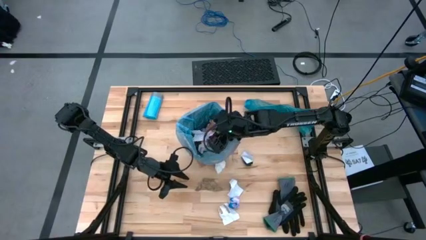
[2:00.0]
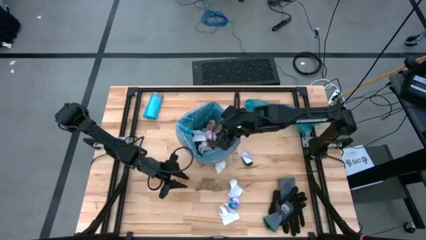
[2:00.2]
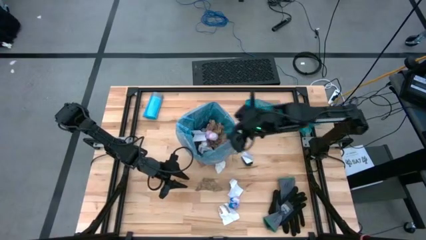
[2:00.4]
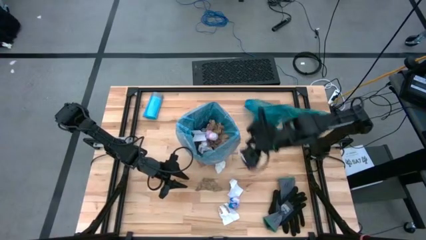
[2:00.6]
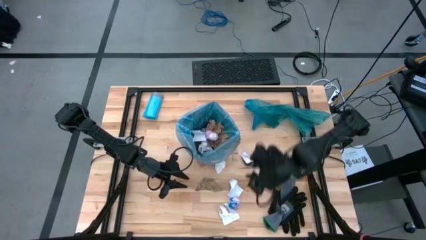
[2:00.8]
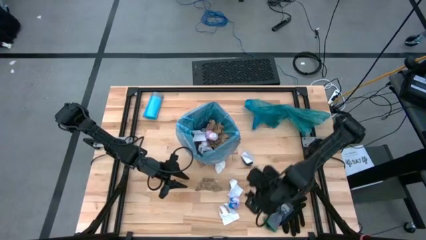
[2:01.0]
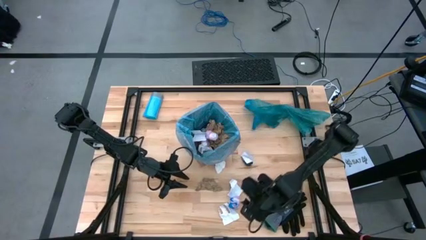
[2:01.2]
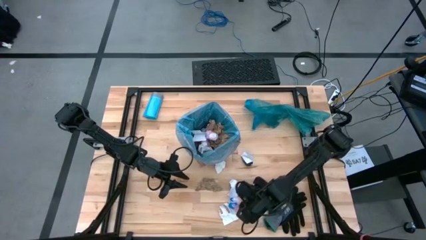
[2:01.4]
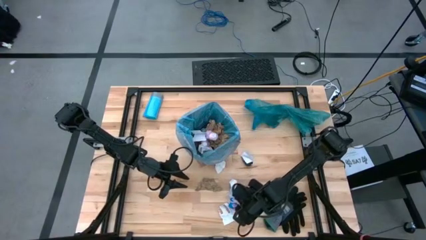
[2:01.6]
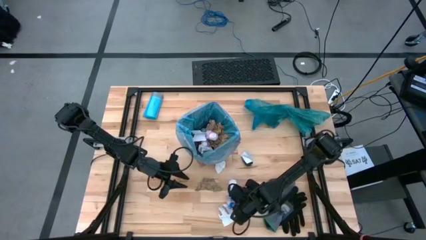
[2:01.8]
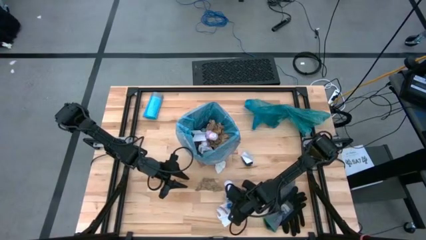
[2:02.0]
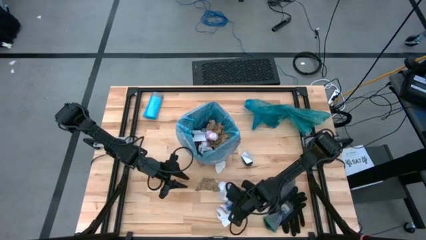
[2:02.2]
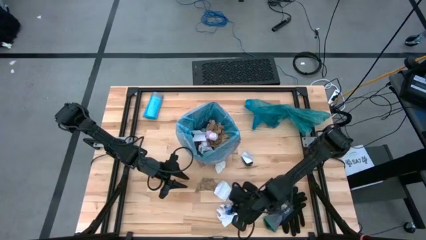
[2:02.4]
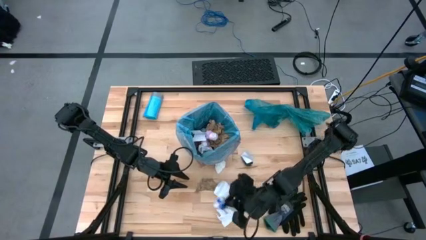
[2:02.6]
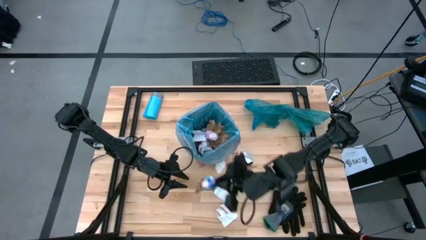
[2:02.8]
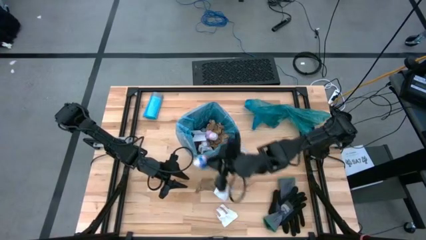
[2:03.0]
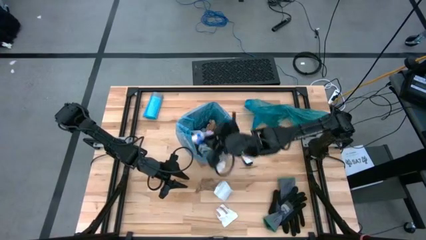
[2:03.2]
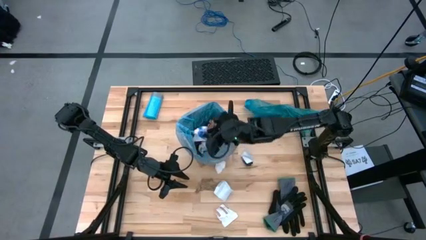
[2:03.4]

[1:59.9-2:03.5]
Task: place trash/remove bag and relplace
Put the pink plastic trash into the trash bin

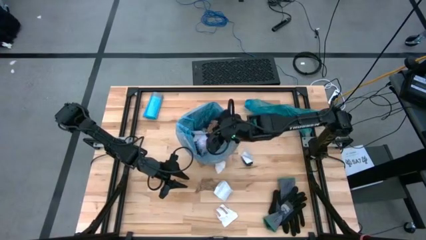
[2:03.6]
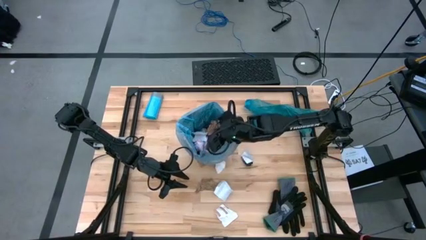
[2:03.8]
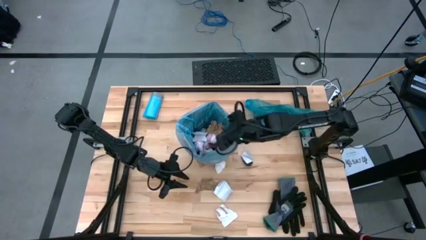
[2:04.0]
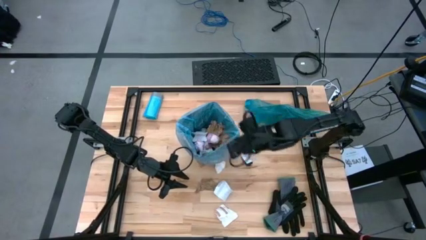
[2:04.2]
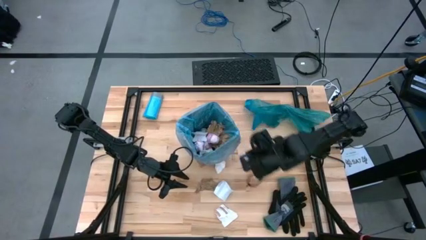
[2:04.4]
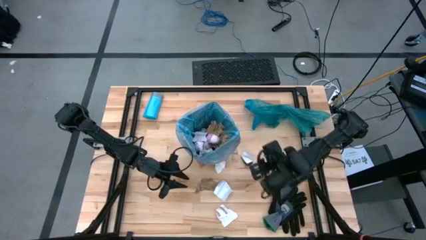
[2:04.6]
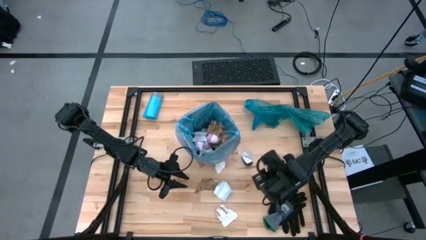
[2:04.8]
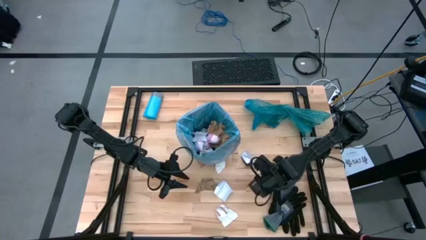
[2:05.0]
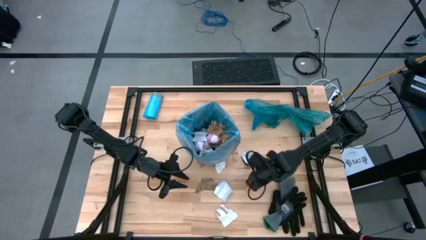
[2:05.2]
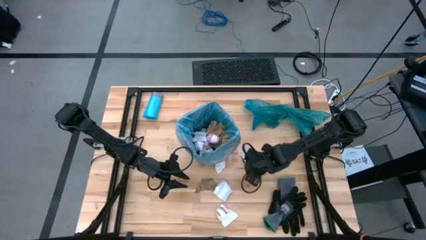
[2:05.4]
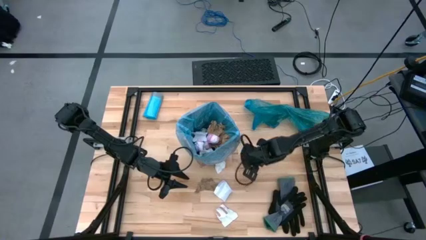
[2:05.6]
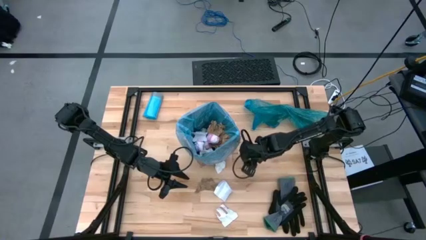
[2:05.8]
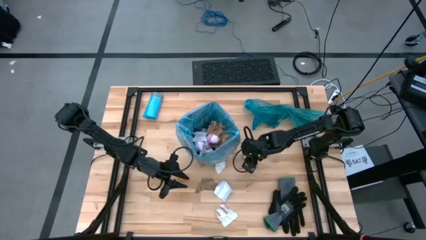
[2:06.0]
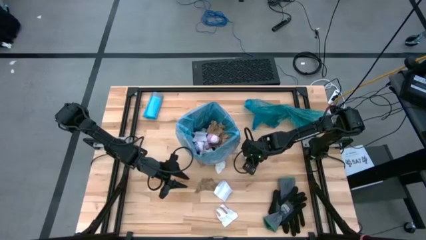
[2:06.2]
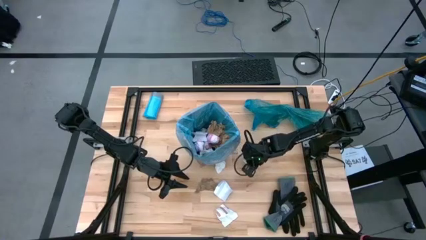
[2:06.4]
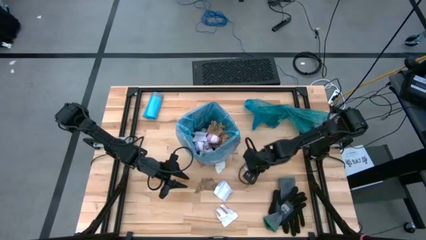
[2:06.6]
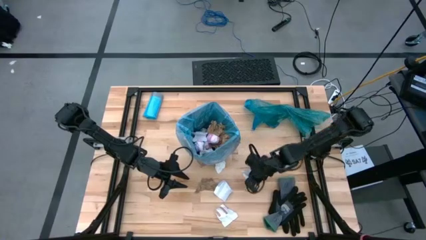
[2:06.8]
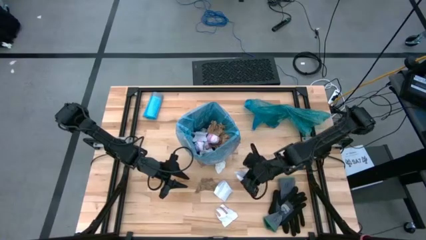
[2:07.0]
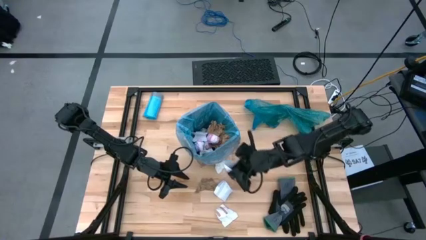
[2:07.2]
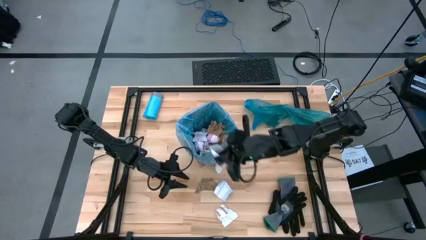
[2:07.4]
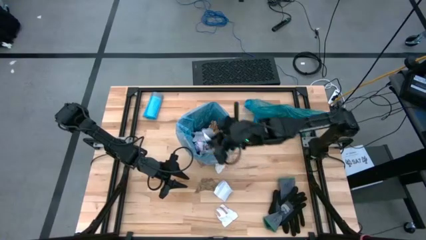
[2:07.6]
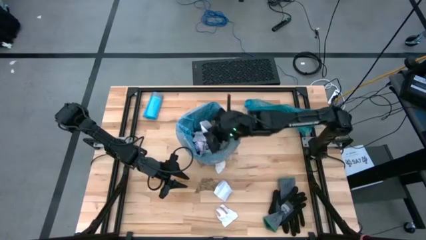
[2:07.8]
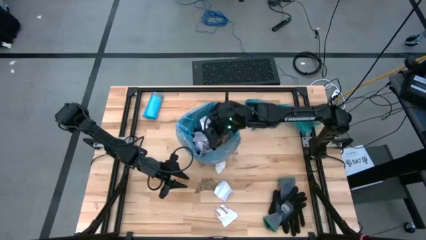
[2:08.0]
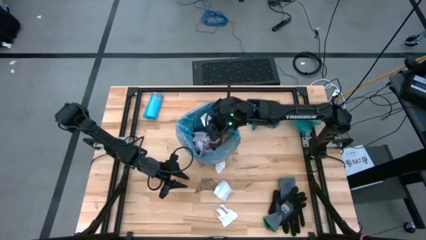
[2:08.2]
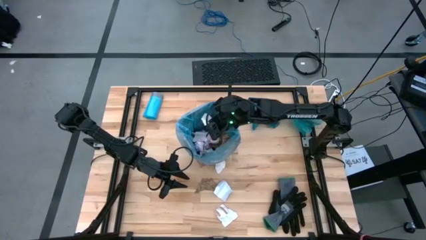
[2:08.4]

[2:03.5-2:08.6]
Put the white paper trash into the trash bin

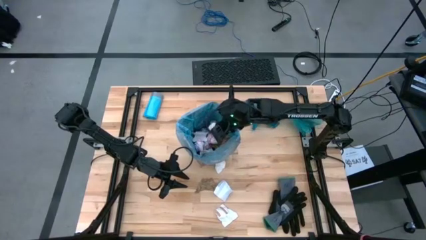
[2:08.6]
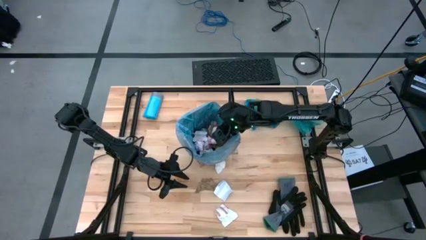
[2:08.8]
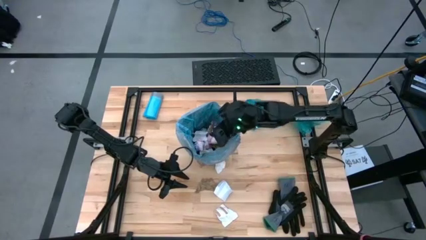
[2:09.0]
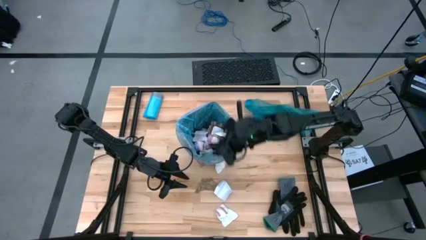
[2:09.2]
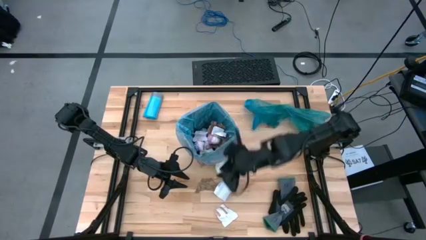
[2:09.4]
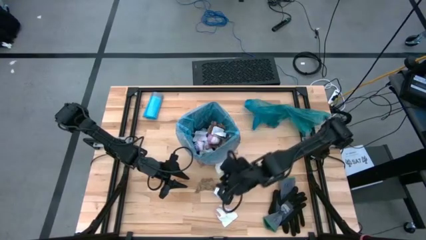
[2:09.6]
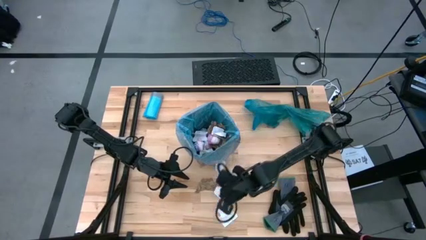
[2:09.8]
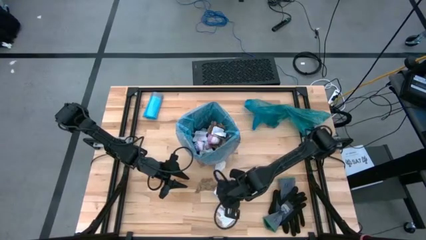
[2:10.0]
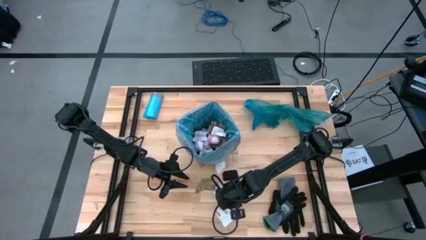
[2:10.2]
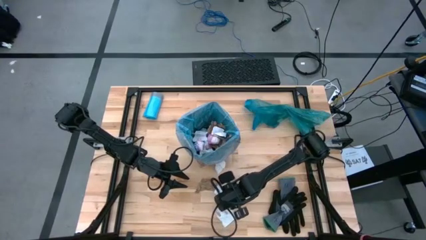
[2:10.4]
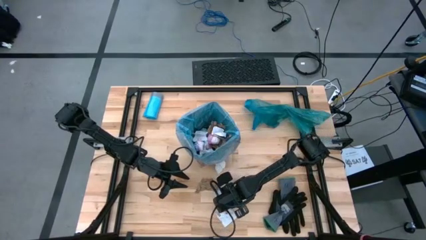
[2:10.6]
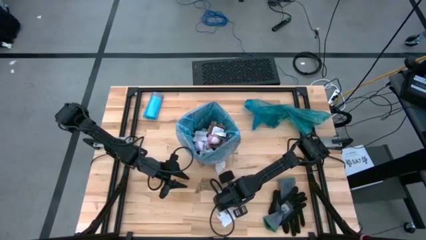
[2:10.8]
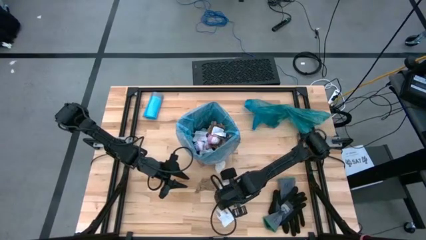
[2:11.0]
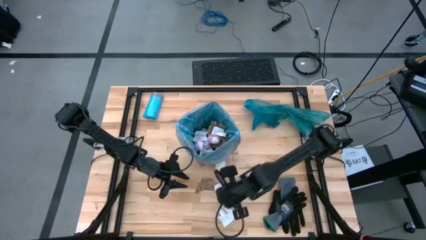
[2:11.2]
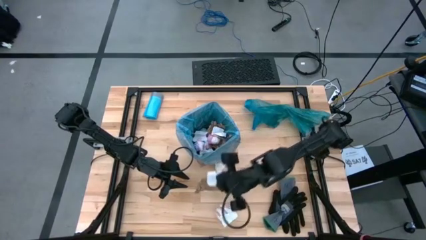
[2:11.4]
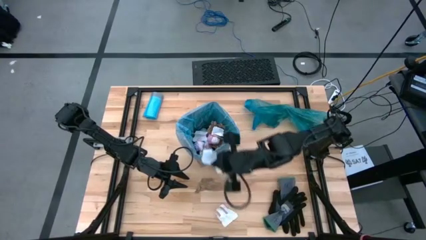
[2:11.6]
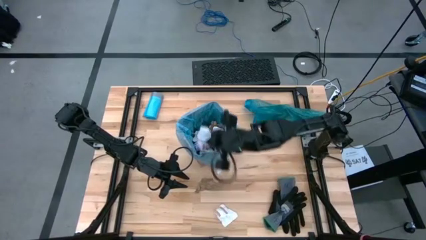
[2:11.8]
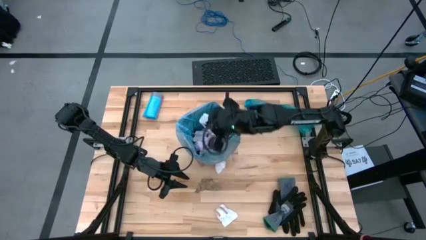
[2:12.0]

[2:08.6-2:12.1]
Put the white paper trash into the trash bin

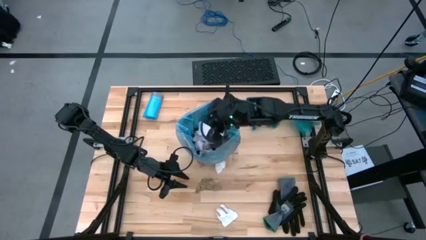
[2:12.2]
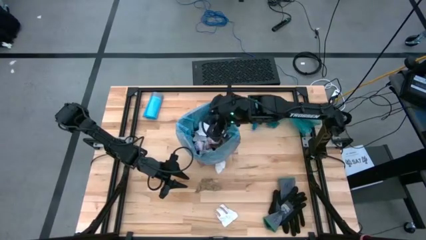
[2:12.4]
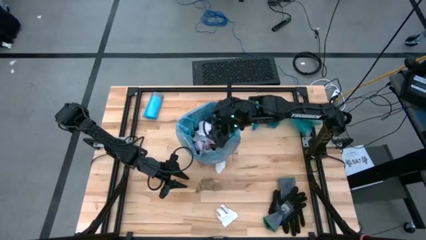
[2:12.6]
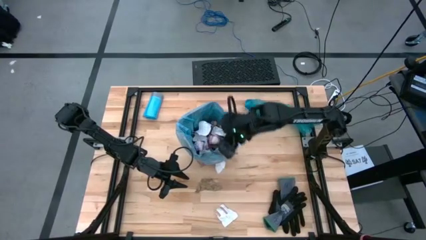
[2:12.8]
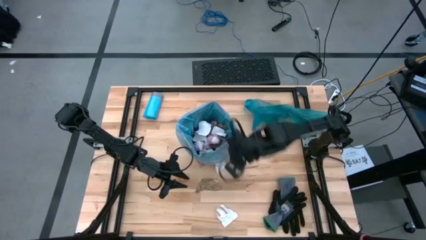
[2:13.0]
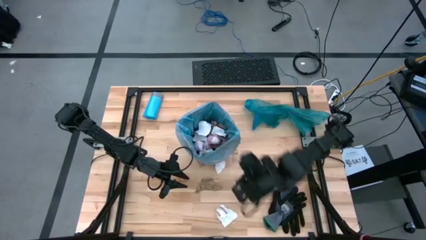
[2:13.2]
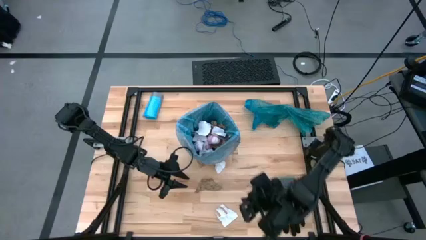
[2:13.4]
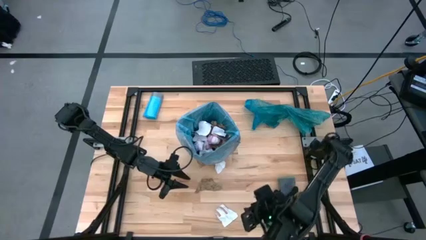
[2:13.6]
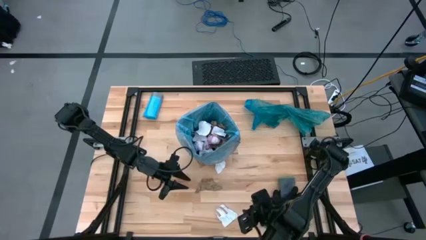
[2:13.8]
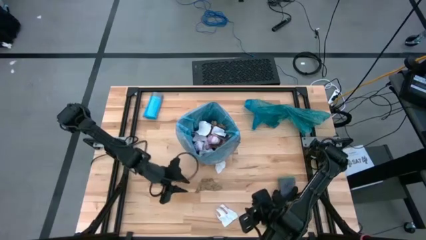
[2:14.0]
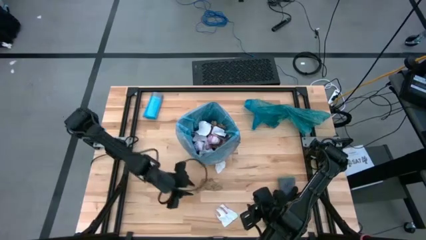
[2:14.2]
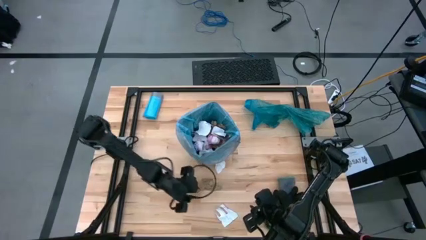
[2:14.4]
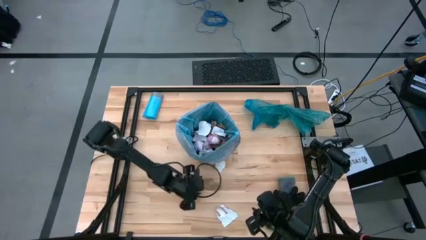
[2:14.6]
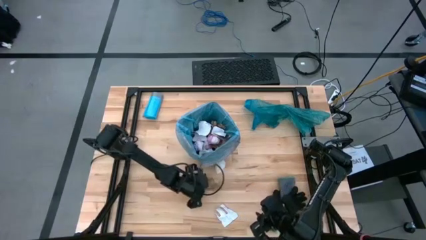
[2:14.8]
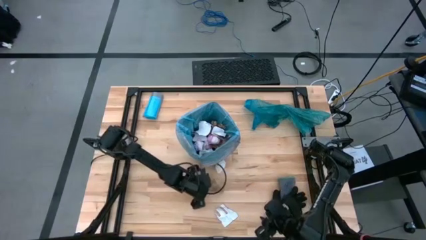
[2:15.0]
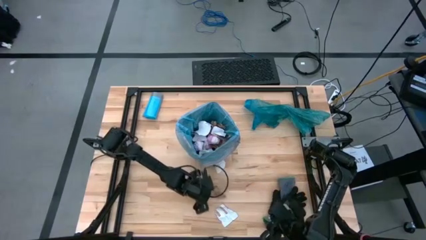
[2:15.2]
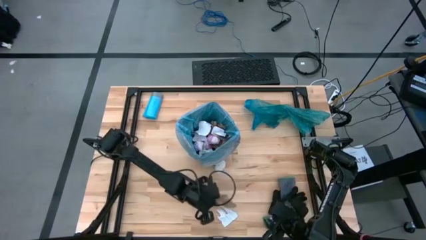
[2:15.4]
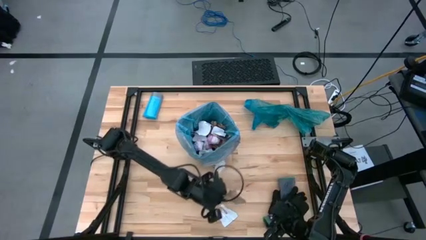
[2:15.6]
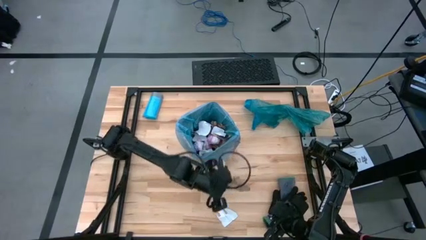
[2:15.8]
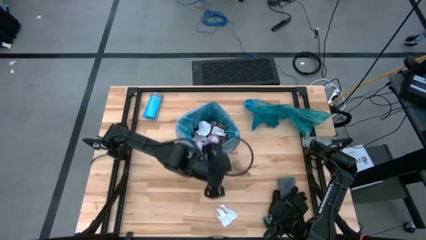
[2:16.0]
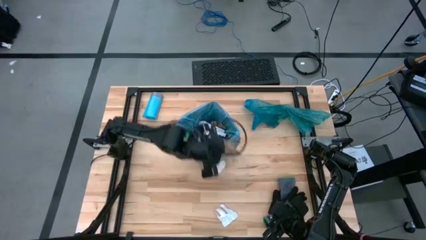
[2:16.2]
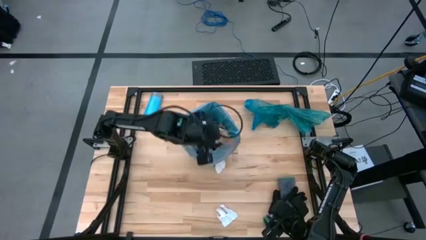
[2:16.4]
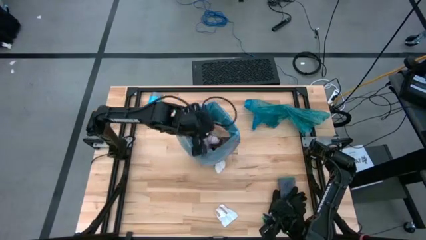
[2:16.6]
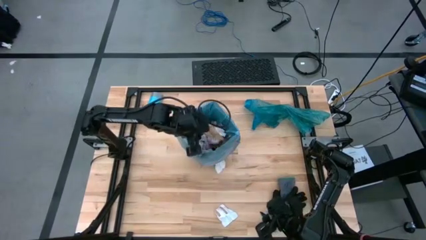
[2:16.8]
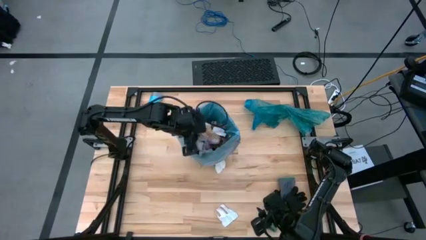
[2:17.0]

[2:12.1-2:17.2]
Put the brown paper trash into the trash bin
